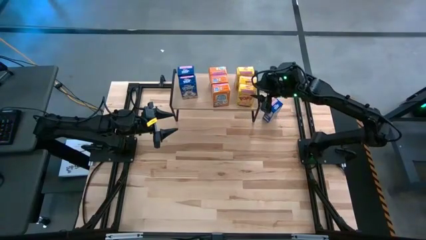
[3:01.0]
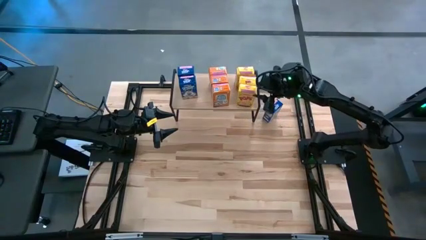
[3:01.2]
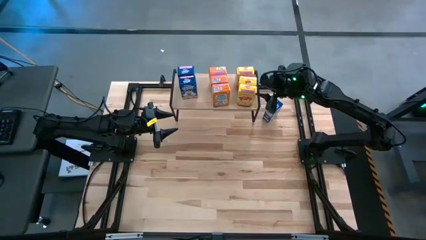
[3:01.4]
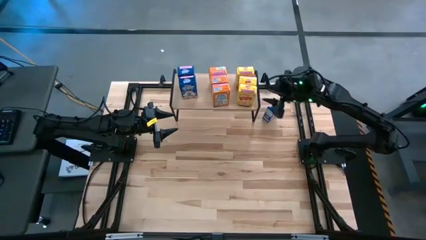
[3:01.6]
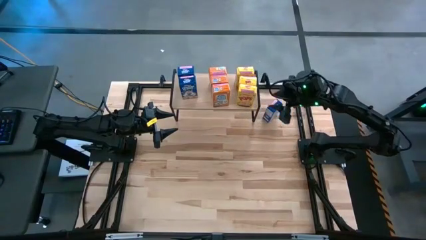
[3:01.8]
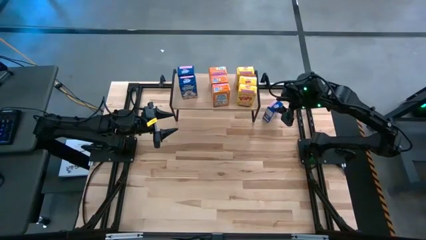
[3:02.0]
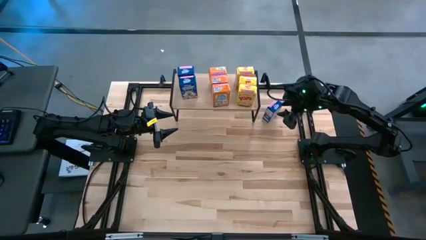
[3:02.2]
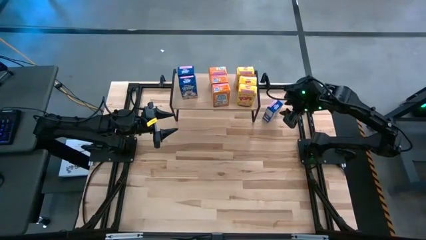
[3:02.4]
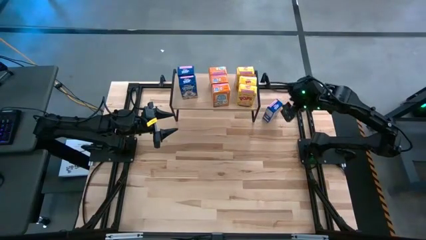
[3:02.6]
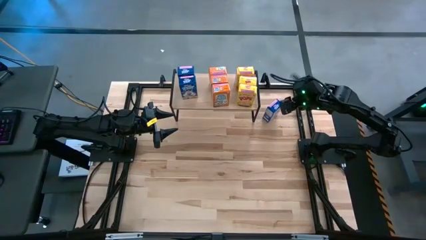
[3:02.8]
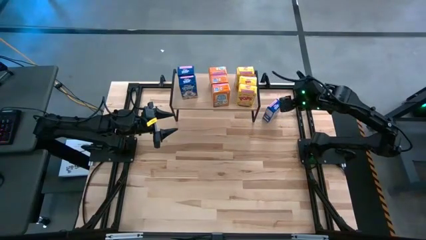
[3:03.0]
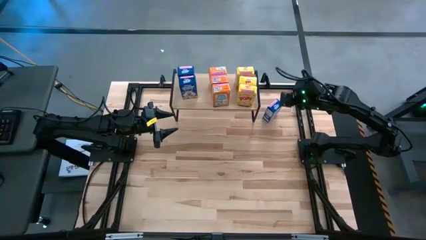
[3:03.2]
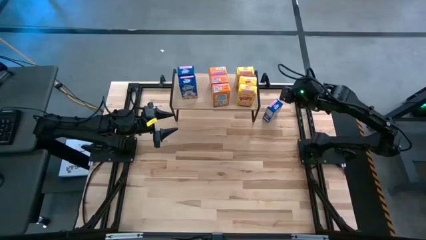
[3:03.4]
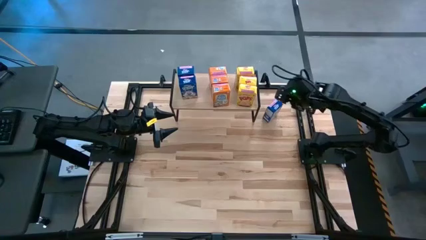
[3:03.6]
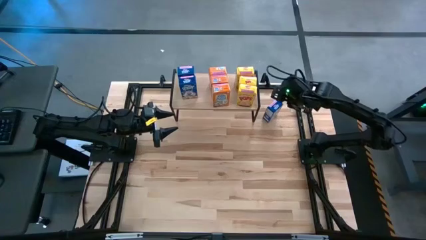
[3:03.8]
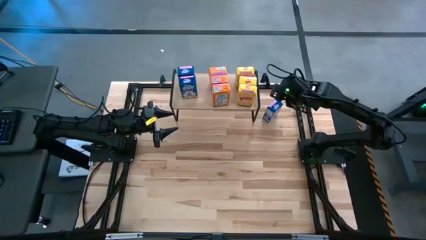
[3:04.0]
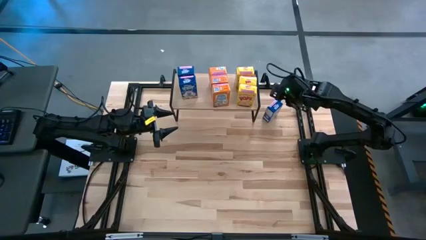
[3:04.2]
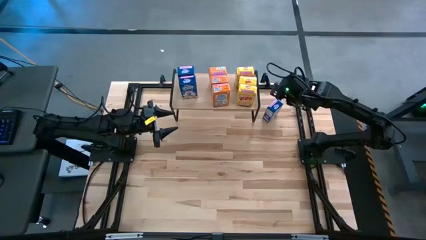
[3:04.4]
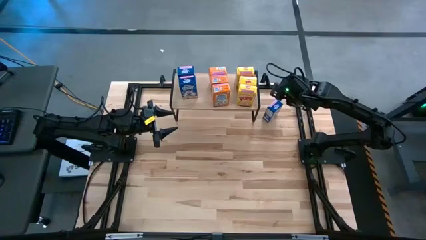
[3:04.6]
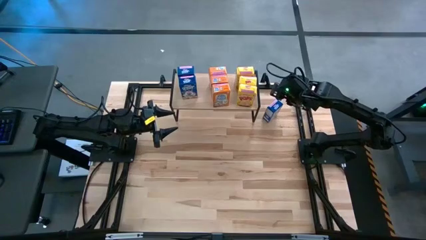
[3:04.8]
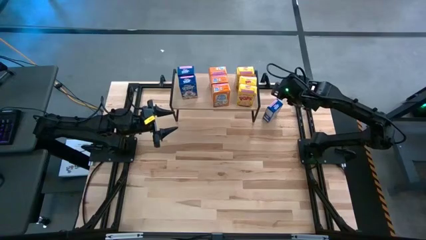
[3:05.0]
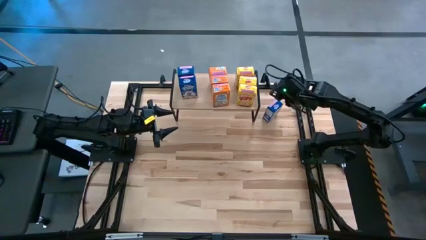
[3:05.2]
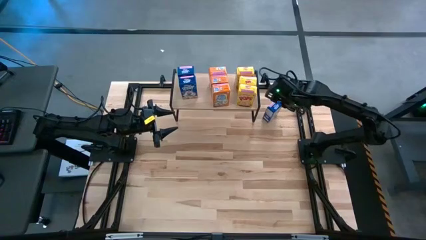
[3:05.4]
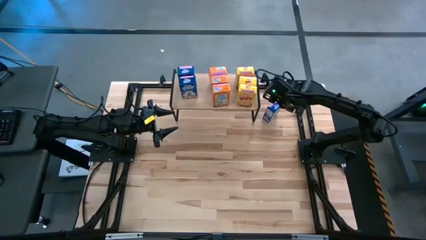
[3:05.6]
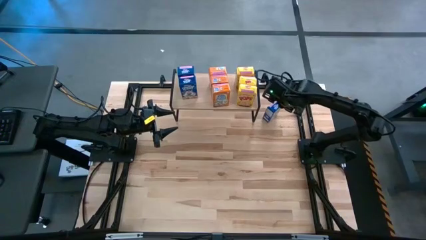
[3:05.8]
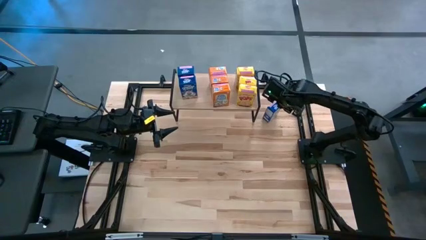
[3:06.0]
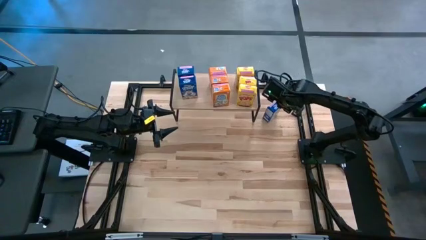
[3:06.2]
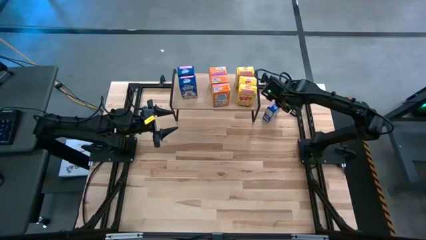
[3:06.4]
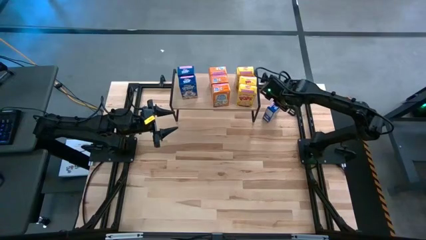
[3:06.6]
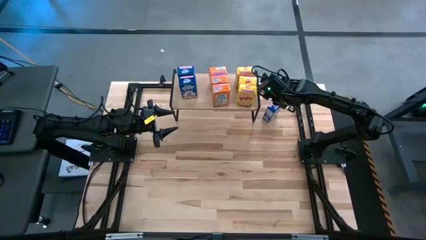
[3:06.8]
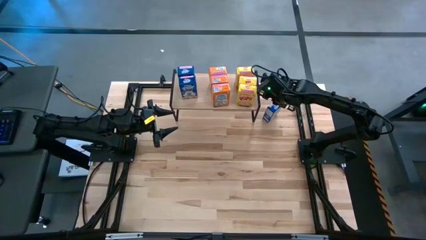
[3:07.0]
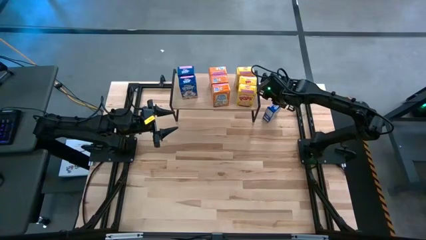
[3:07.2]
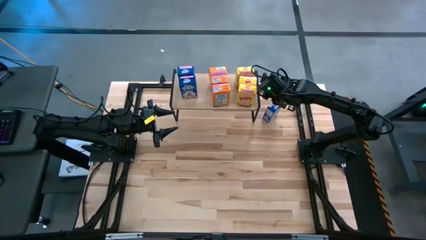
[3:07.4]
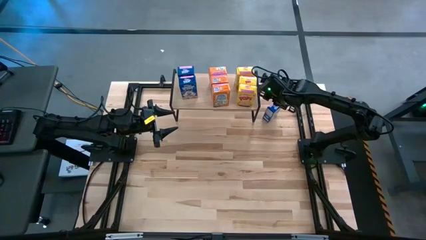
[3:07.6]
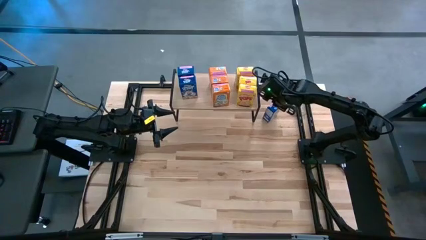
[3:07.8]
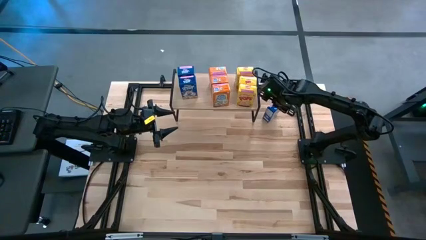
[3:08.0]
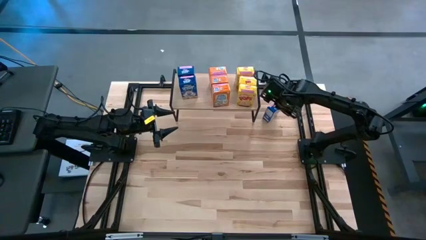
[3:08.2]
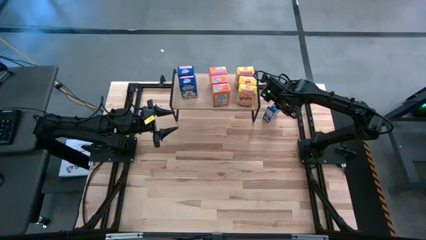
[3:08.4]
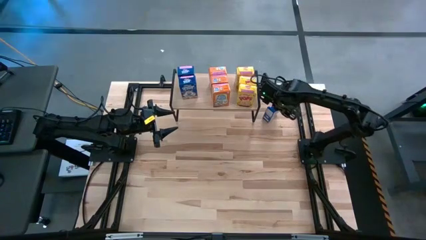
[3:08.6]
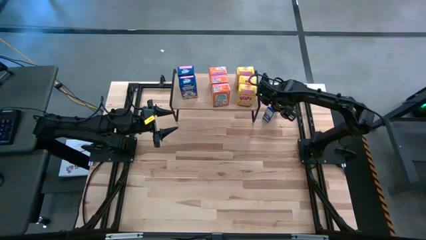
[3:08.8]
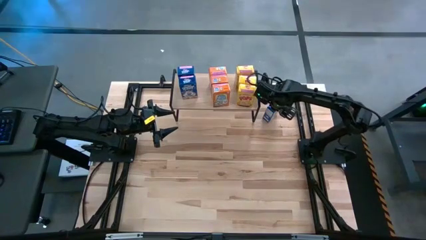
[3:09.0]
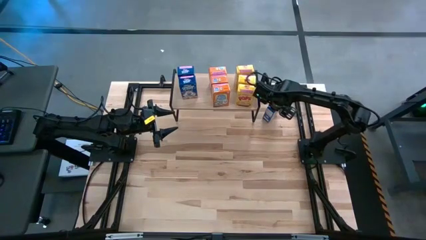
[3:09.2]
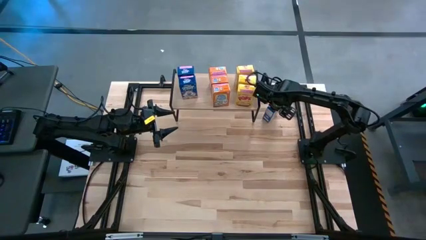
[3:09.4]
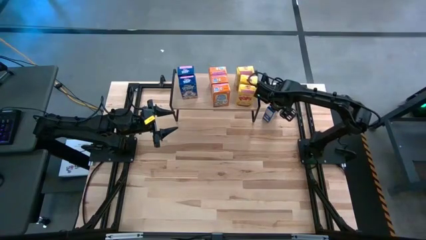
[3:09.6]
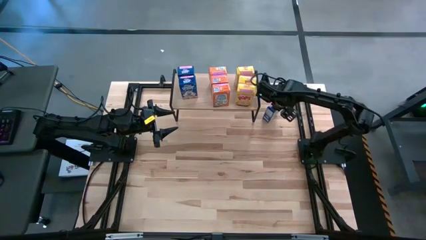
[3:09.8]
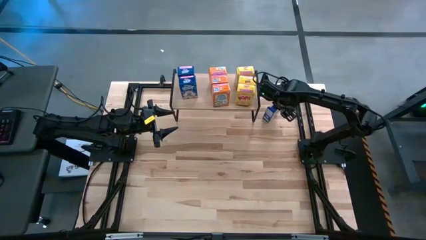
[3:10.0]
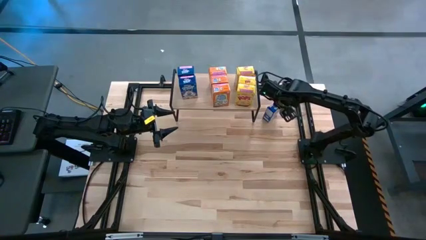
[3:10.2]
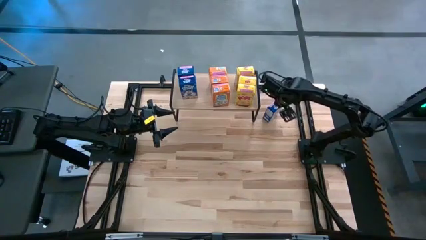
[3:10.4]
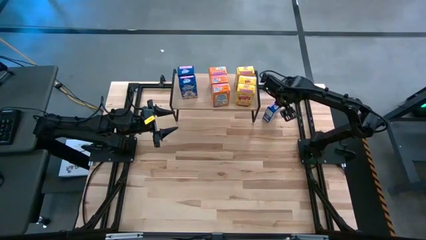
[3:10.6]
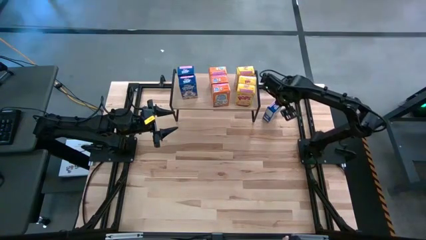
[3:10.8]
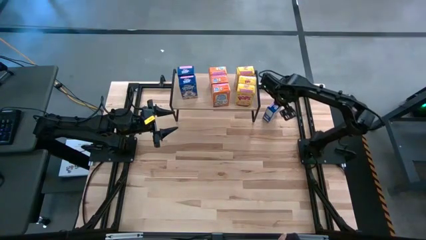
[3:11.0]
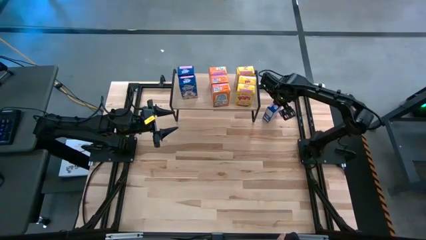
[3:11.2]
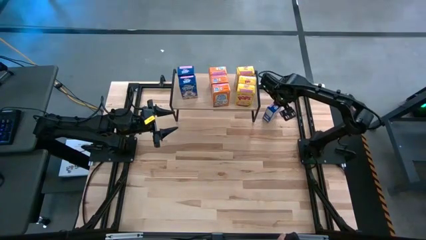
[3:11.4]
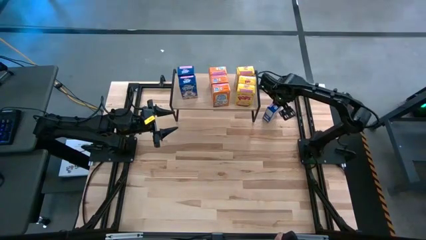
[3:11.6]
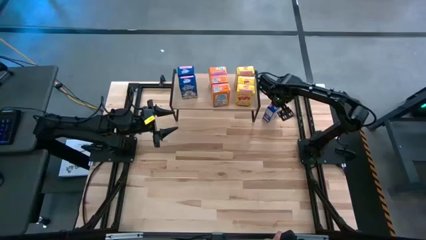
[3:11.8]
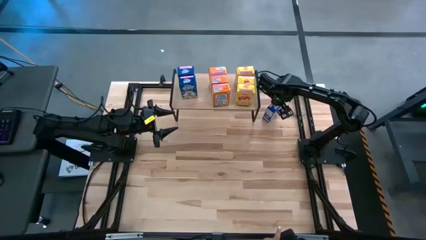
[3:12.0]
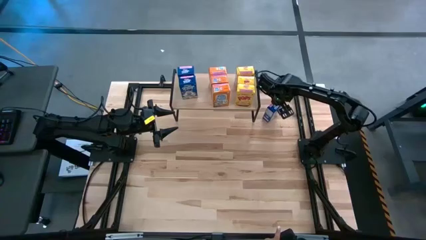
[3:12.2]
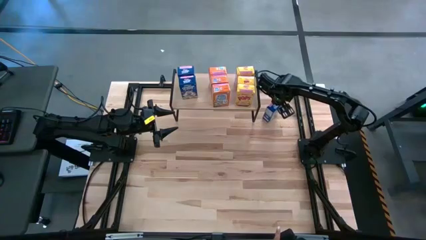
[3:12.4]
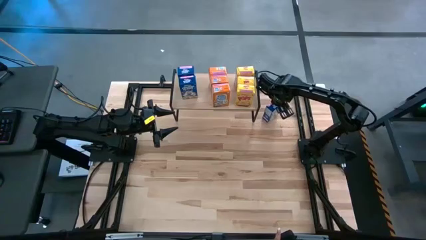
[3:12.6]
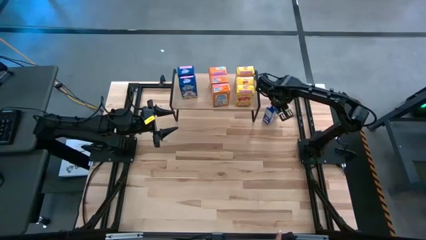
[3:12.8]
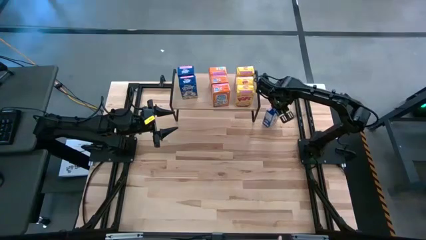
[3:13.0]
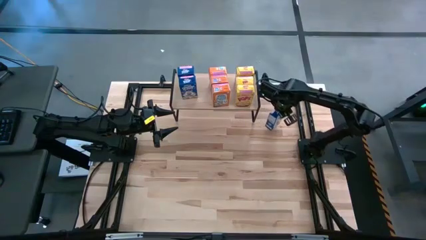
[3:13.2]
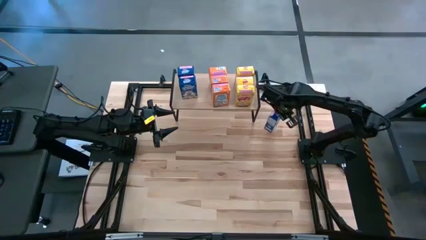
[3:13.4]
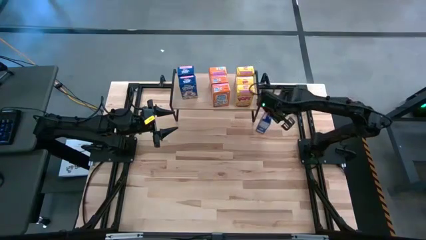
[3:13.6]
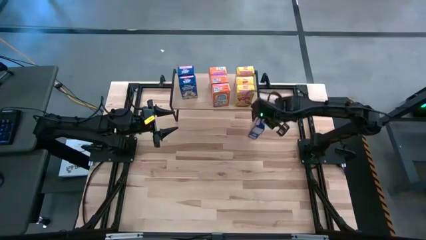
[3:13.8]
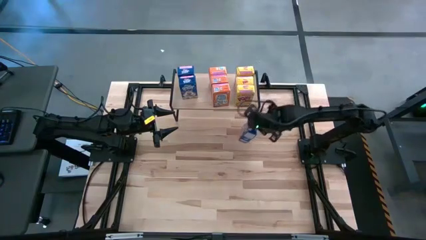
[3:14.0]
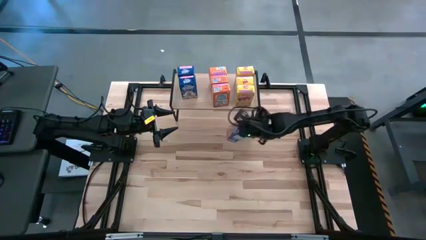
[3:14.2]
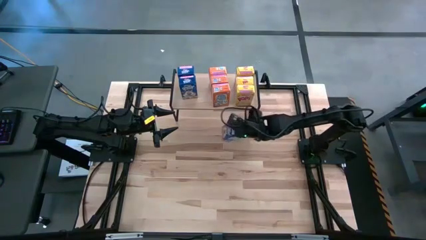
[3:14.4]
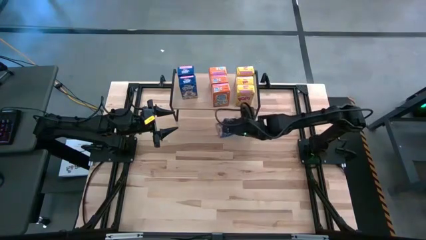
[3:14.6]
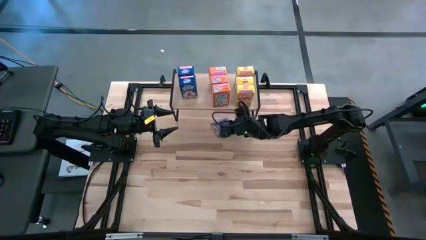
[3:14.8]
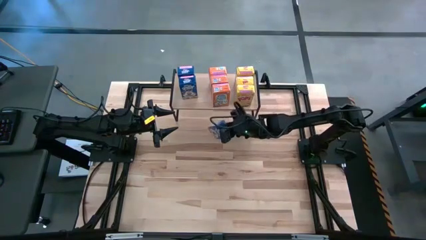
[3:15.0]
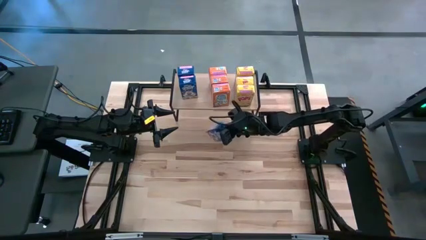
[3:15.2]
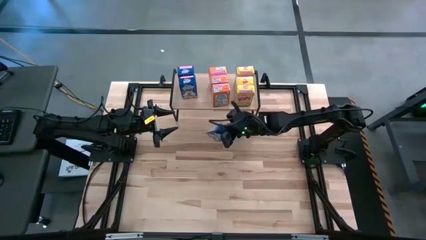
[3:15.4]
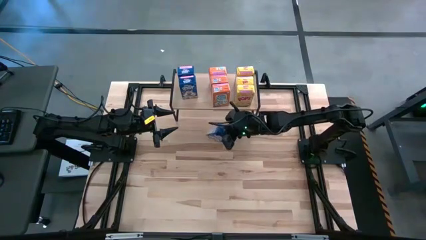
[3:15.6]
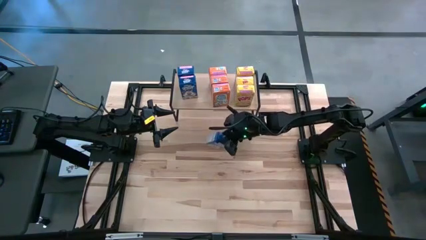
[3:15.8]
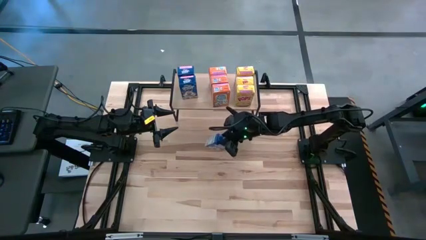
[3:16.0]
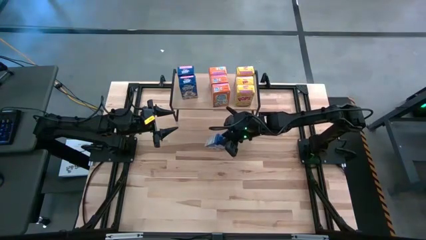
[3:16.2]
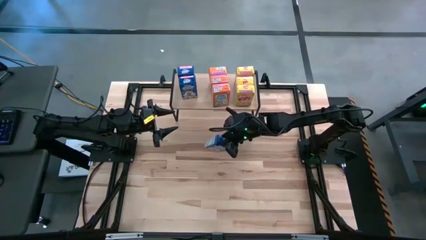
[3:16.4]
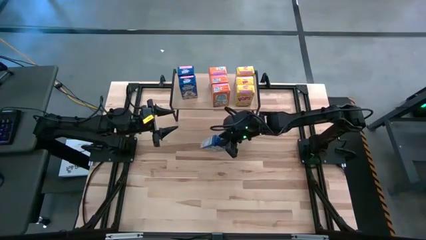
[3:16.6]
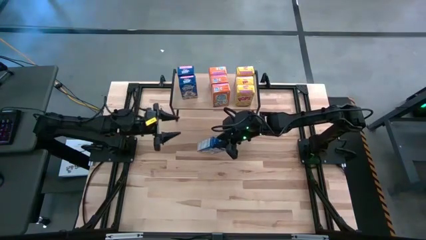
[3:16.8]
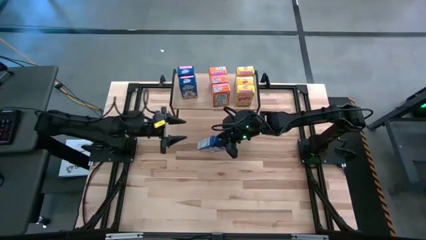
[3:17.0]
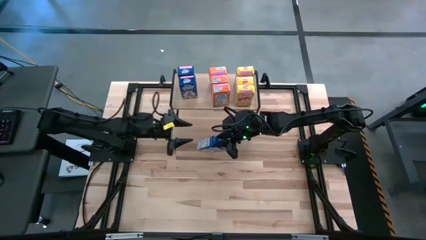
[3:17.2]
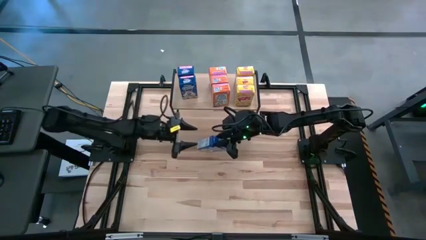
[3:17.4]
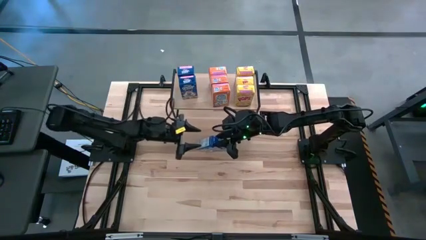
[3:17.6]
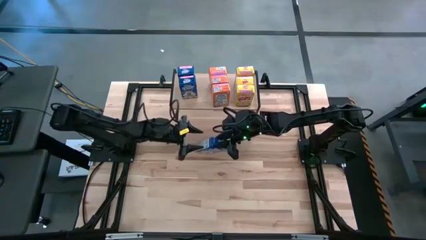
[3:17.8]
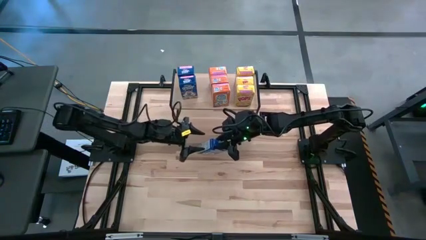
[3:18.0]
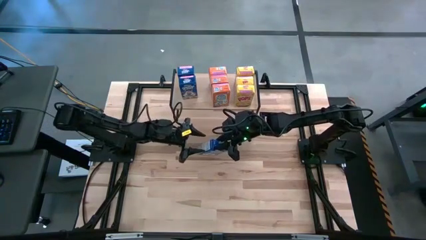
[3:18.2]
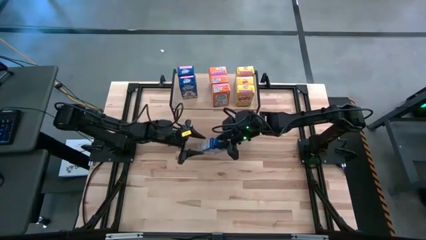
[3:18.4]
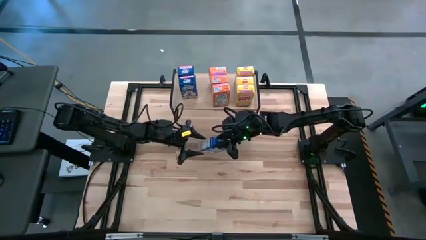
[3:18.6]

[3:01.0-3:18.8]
Task: Stack cereal on shelf
Put the blue cereal box aligned with the other blue cereal boxes on the shelf
